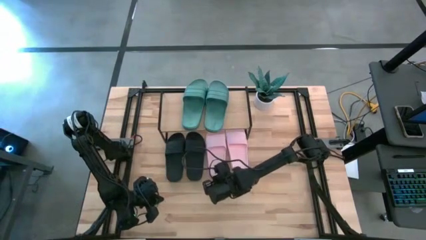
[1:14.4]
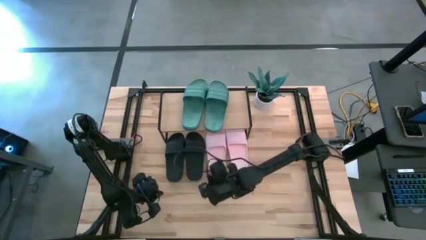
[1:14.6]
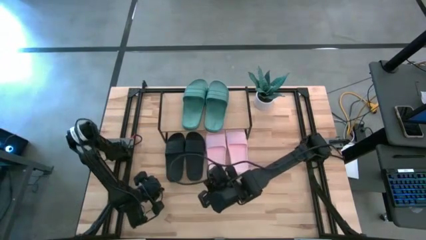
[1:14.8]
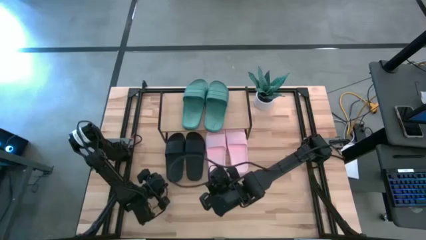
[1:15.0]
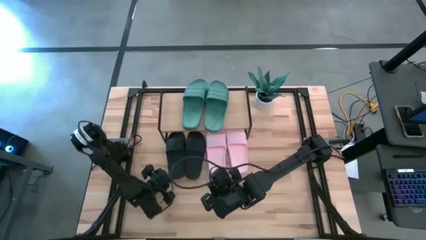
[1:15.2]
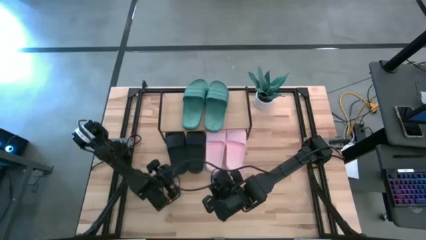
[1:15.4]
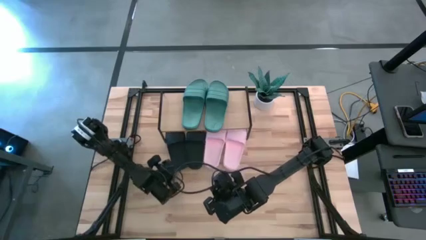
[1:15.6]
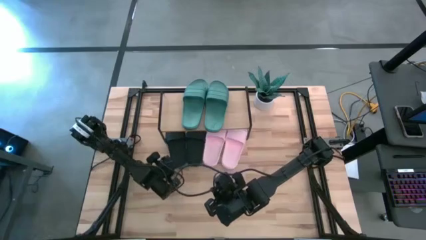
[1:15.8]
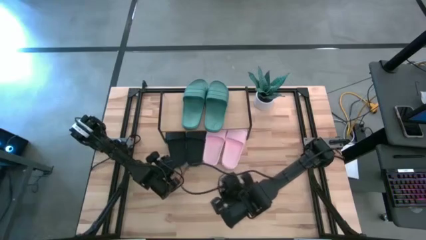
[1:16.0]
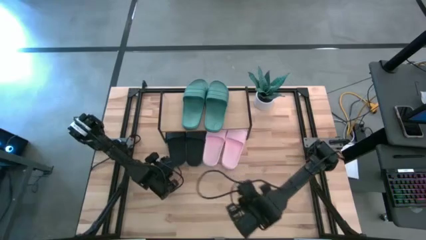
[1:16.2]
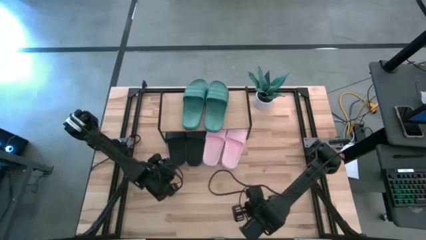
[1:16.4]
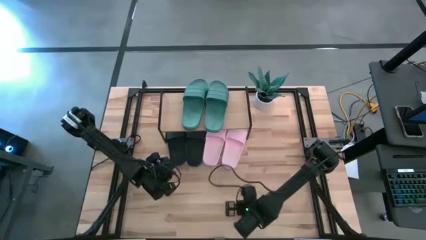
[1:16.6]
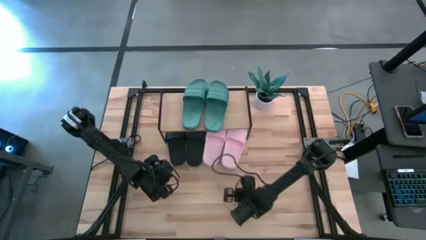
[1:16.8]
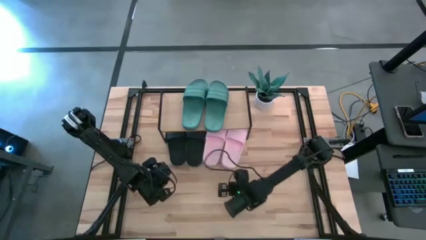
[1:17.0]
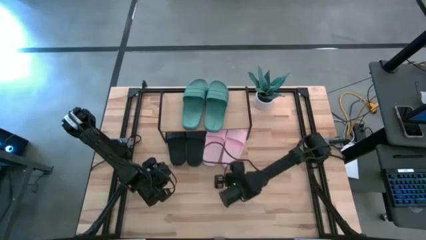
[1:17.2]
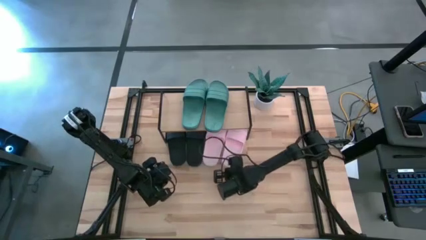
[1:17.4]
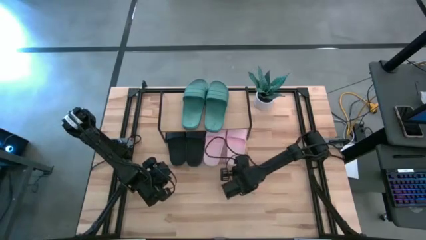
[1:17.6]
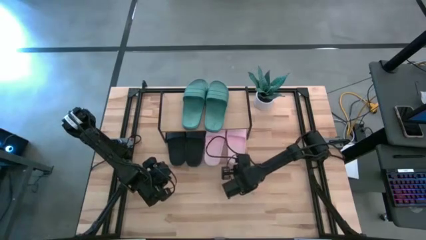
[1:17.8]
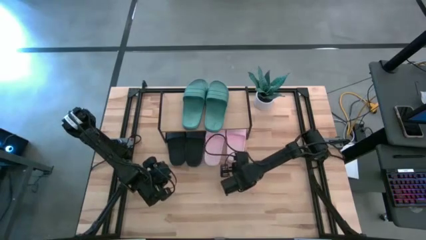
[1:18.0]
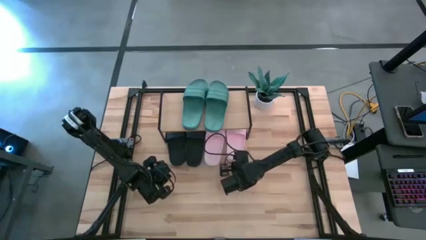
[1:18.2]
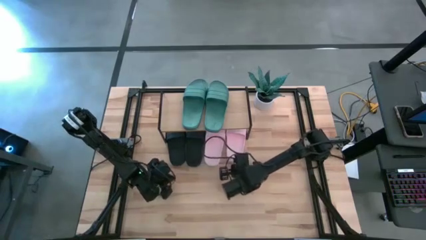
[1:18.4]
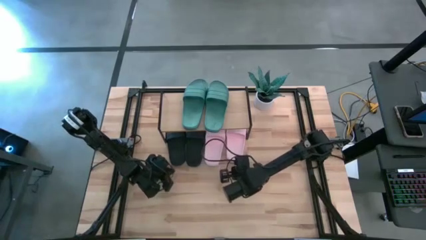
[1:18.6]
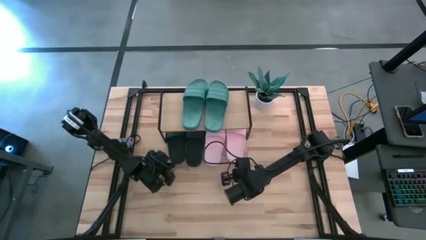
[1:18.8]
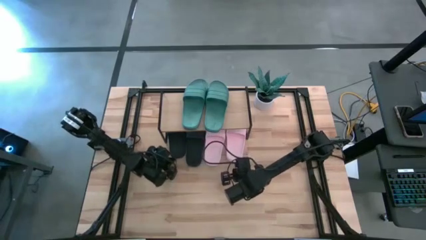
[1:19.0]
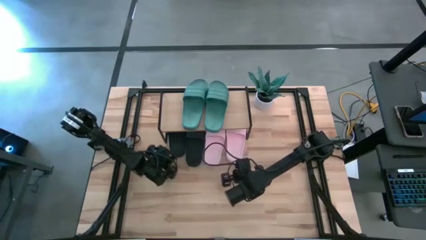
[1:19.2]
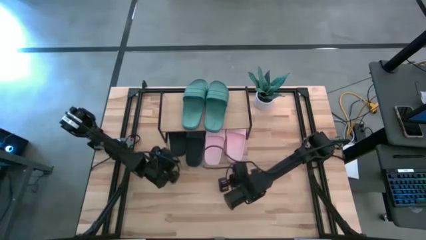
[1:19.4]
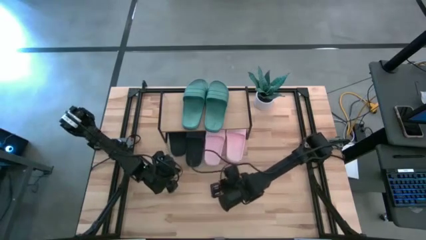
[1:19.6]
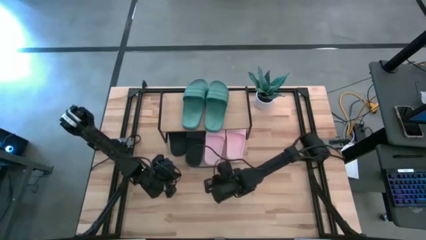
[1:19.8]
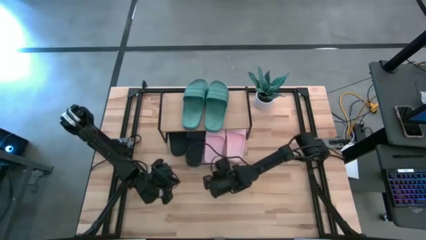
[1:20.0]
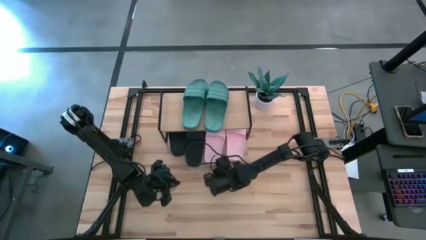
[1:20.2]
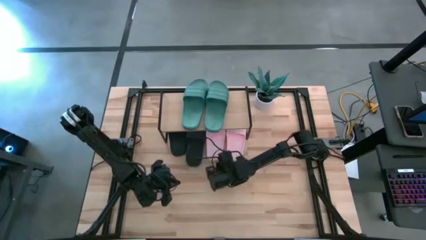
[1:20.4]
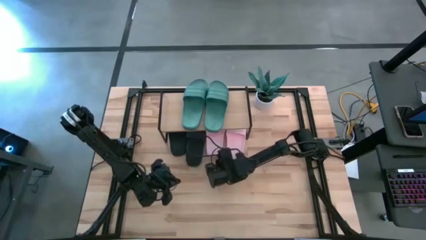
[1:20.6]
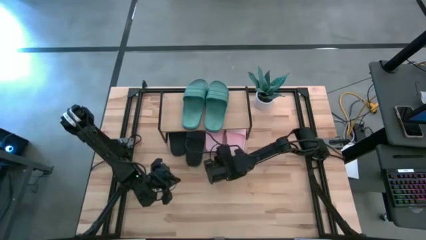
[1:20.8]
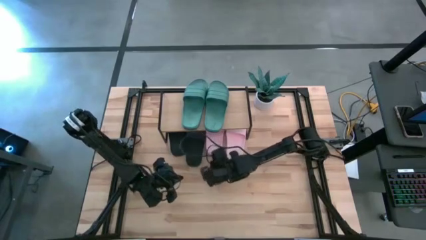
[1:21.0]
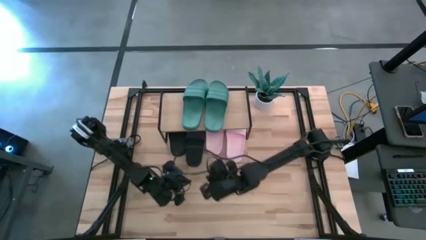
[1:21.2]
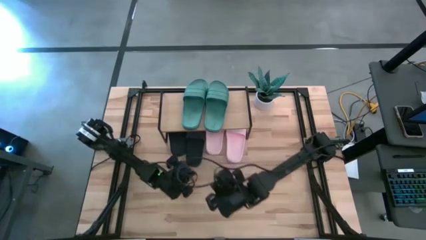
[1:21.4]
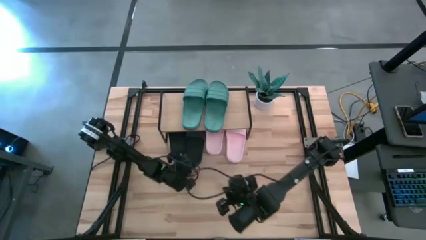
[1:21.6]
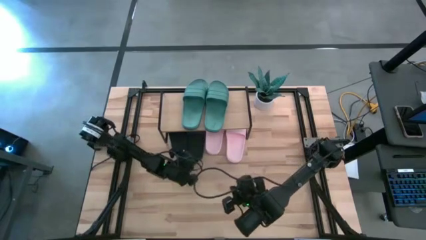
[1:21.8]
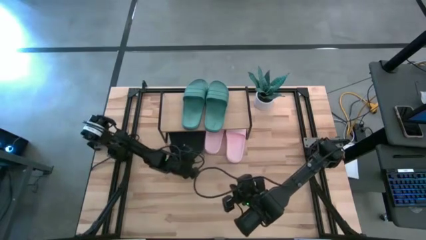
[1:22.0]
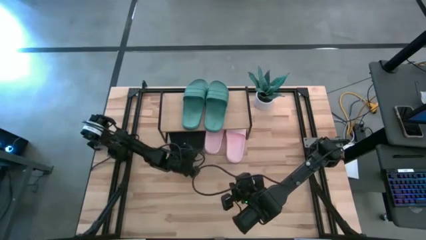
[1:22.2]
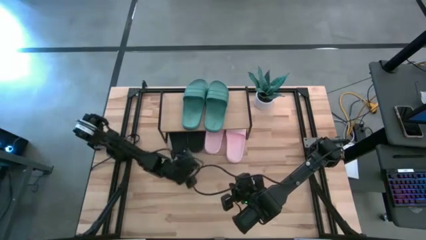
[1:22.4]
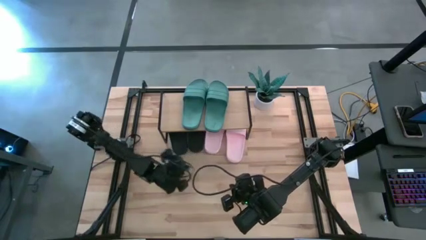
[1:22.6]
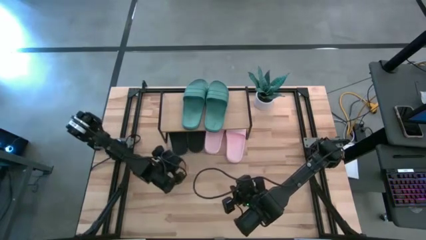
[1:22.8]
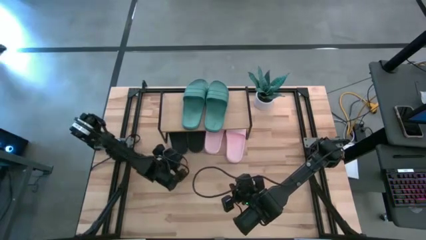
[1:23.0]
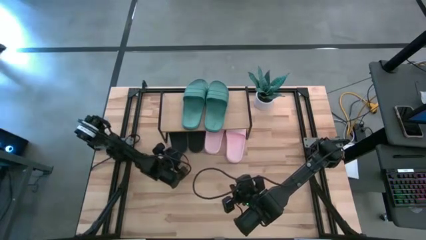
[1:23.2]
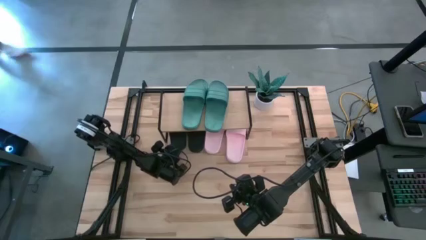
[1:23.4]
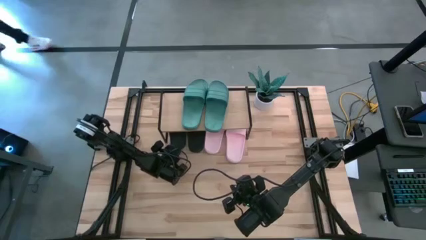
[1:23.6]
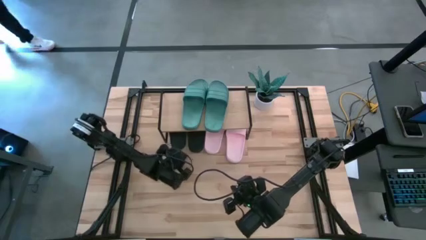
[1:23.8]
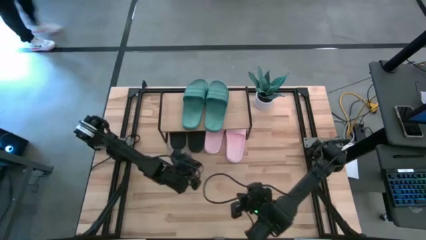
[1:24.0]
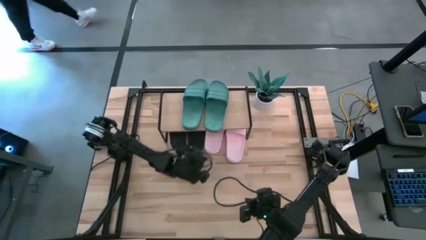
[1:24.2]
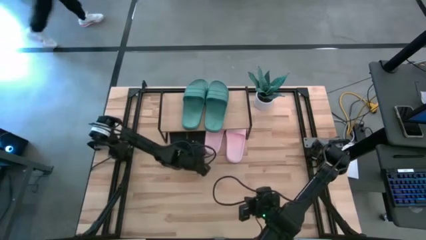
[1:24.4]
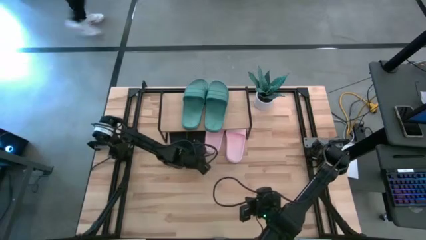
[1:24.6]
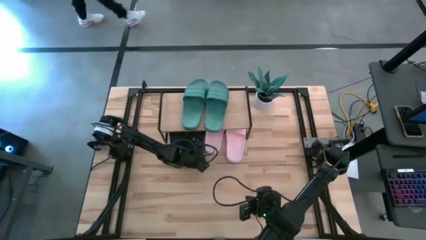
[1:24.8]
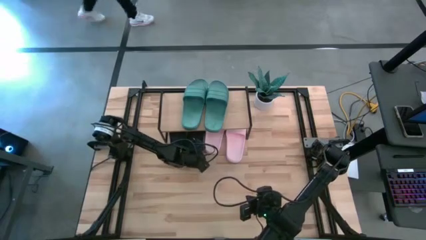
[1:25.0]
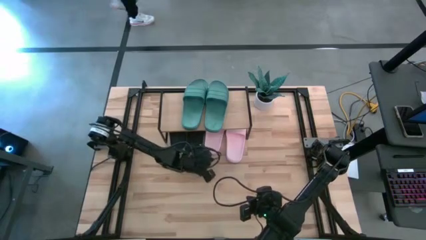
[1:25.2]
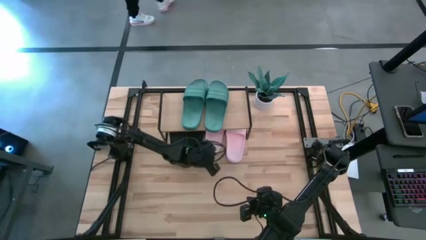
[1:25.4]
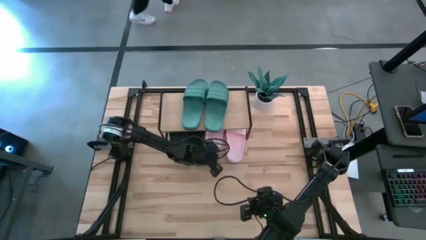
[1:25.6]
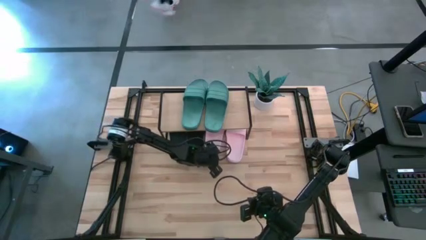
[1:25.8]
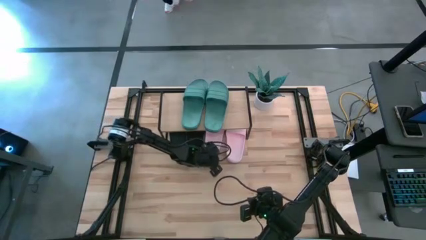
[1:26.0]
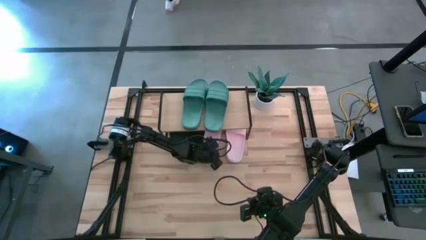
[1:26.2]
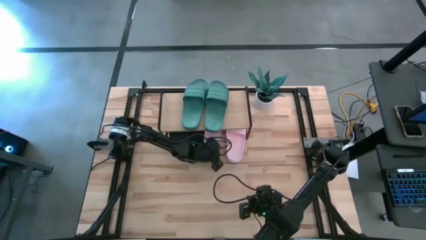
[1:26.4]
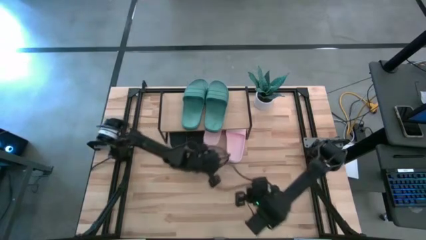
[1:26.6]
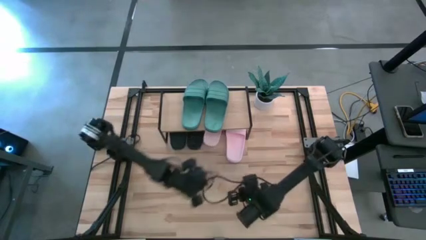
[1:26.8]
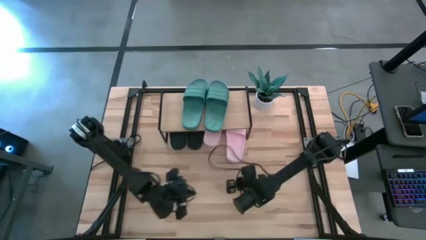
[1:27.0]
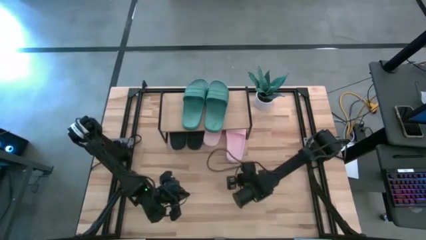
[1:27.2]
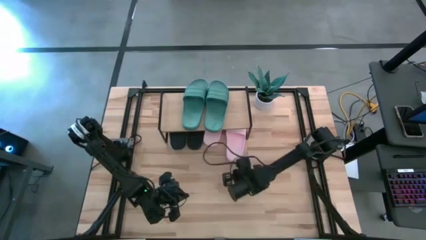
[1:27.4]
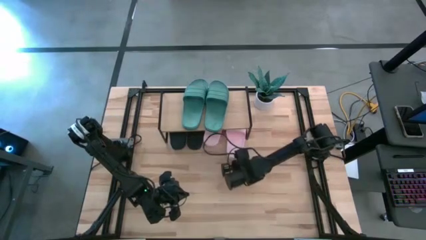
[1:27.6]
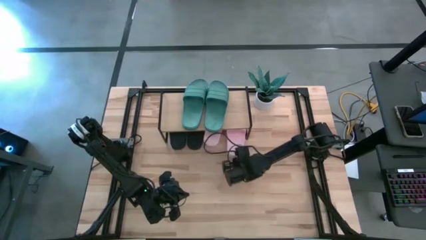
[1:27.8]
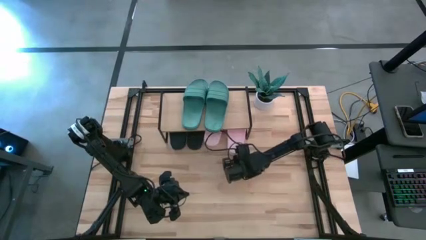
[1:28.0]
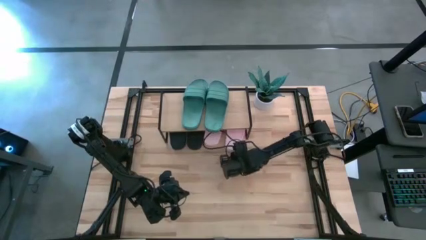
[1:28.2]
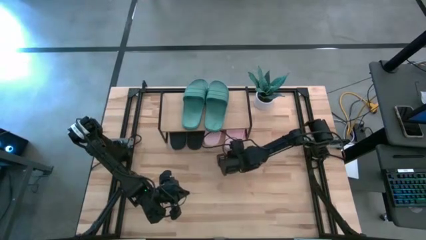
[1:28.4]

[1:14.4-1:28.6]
Task: Pick and place slides into the shelf
Adjust the black and pink slides under the shelf
